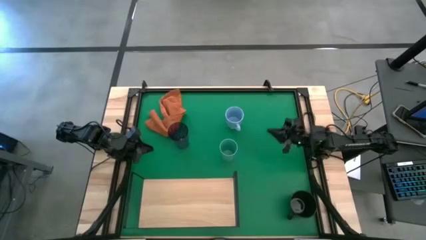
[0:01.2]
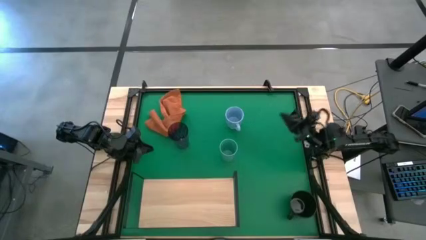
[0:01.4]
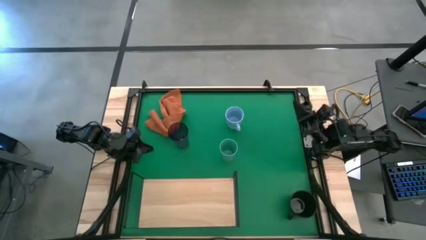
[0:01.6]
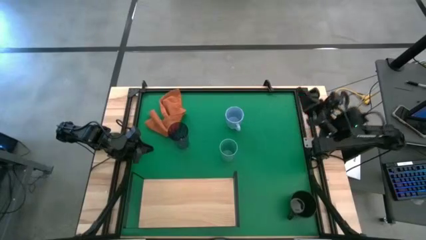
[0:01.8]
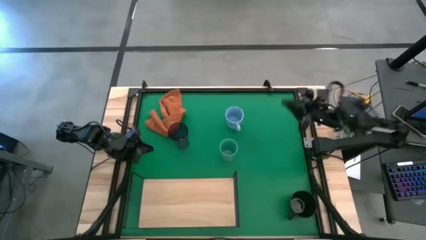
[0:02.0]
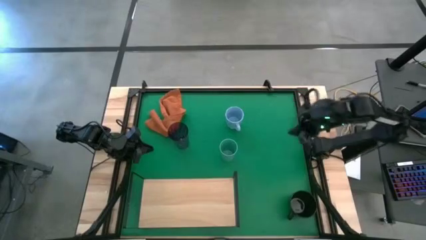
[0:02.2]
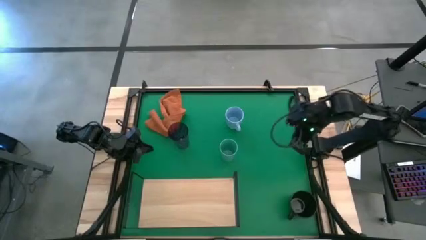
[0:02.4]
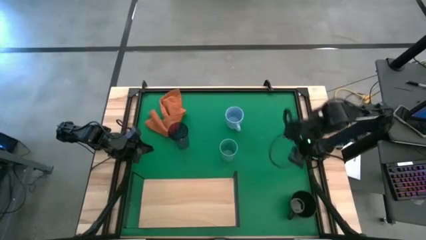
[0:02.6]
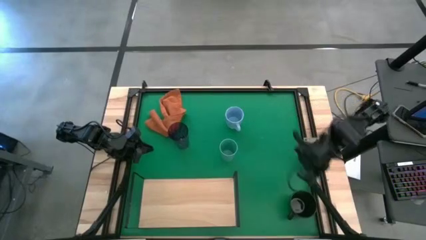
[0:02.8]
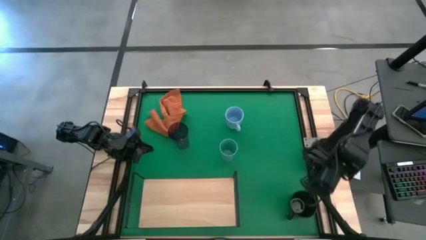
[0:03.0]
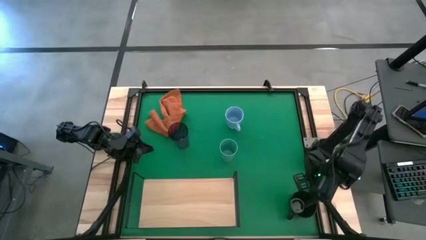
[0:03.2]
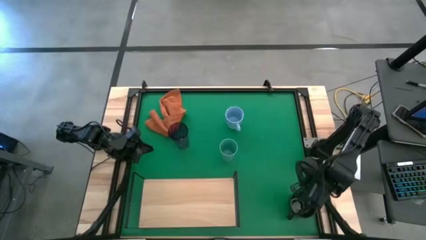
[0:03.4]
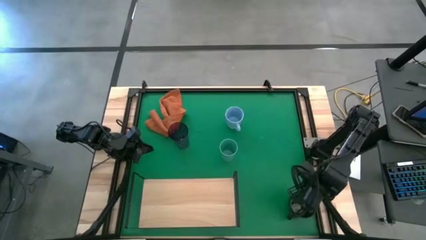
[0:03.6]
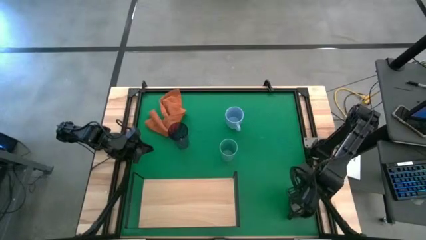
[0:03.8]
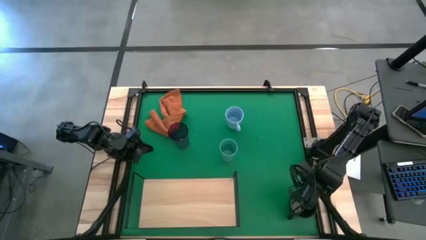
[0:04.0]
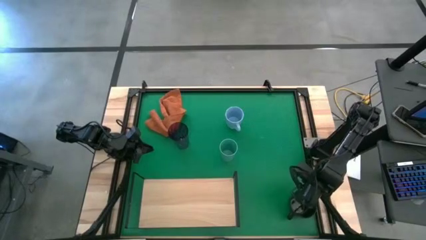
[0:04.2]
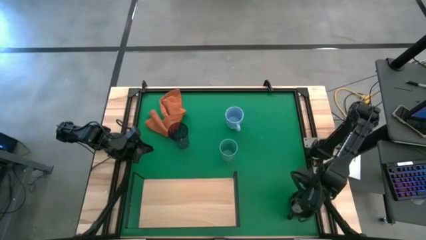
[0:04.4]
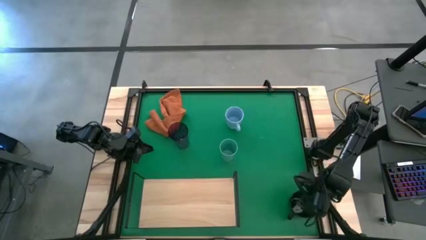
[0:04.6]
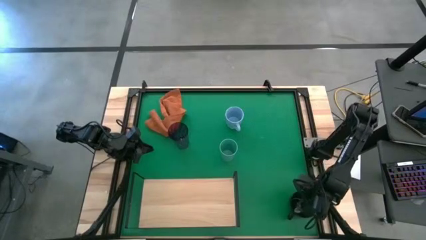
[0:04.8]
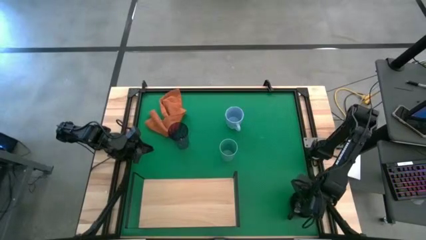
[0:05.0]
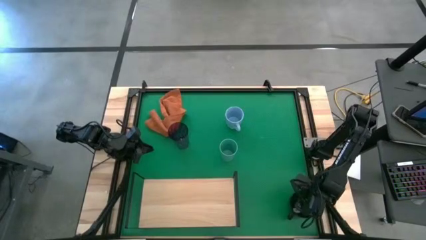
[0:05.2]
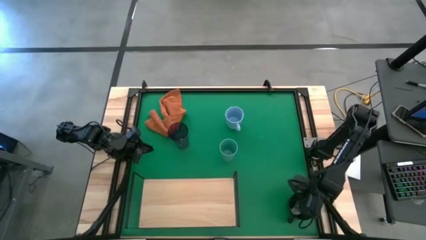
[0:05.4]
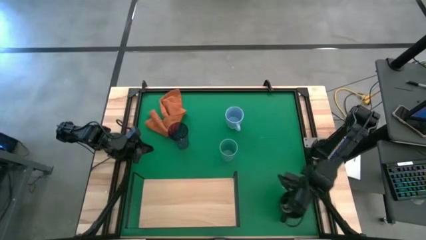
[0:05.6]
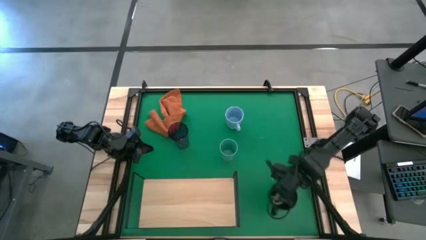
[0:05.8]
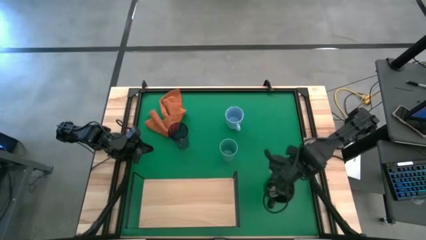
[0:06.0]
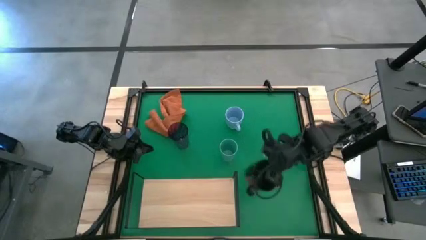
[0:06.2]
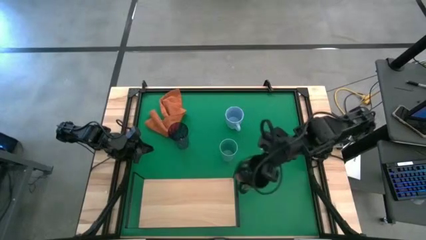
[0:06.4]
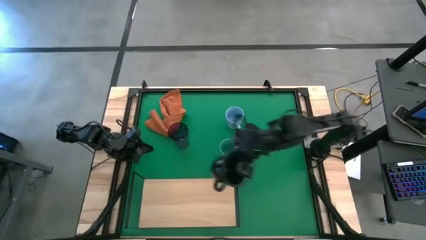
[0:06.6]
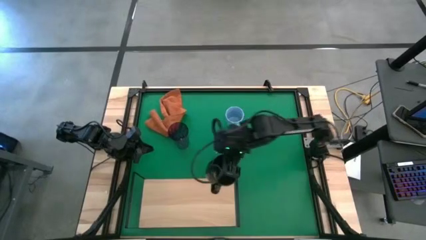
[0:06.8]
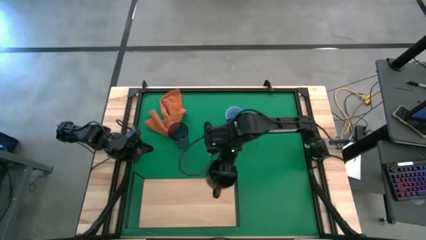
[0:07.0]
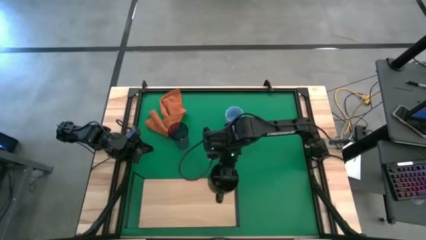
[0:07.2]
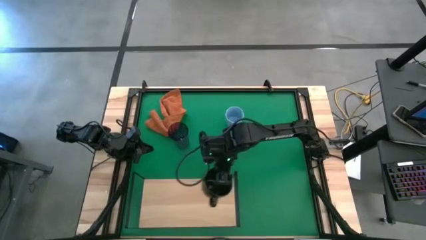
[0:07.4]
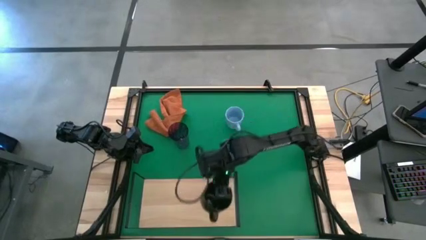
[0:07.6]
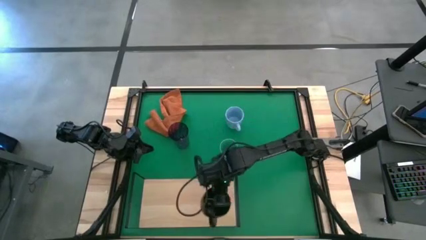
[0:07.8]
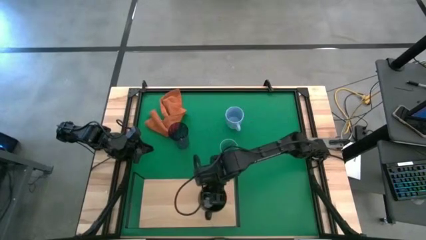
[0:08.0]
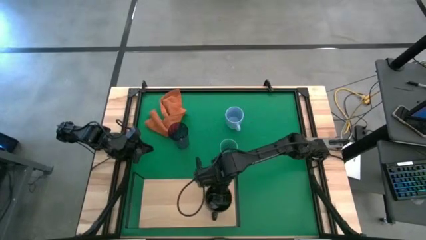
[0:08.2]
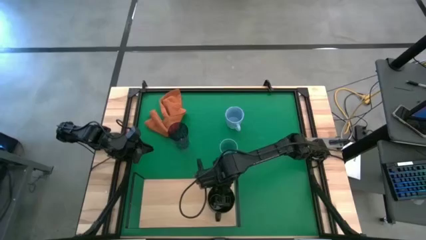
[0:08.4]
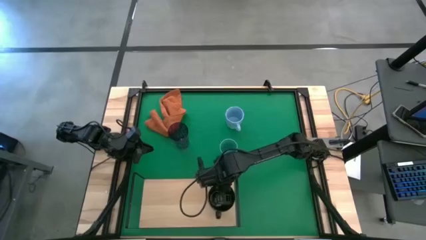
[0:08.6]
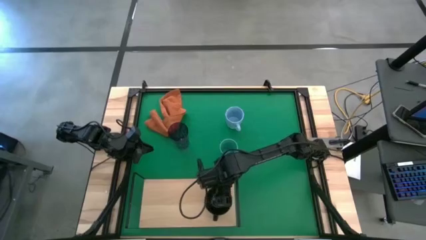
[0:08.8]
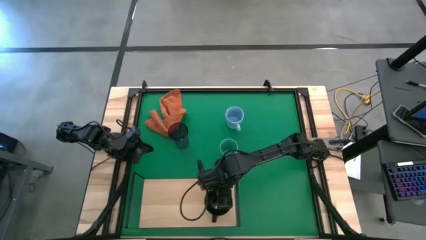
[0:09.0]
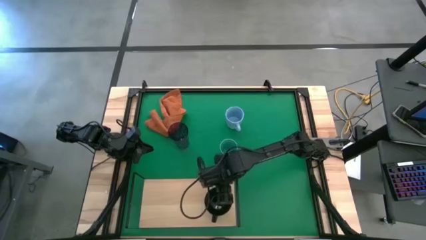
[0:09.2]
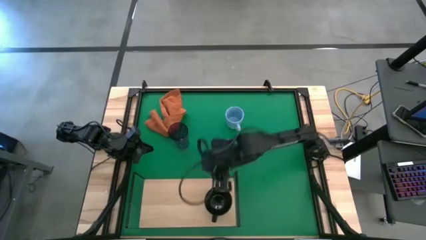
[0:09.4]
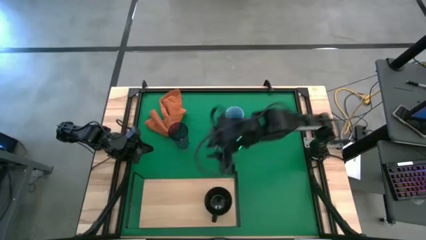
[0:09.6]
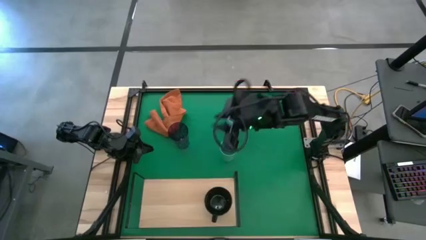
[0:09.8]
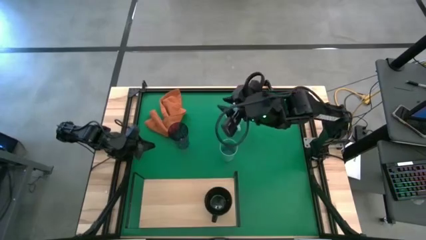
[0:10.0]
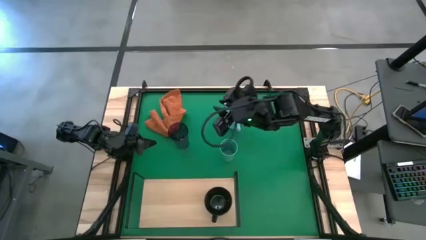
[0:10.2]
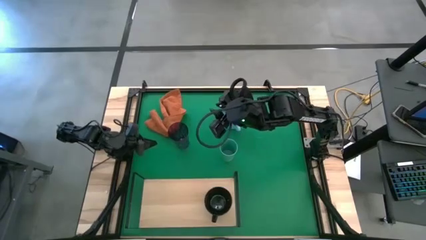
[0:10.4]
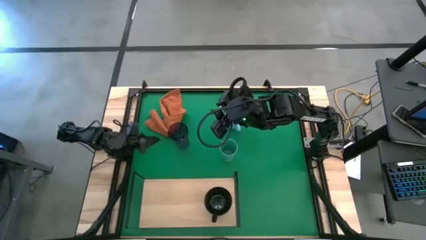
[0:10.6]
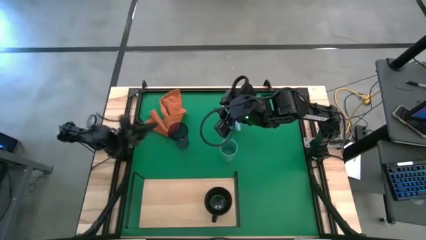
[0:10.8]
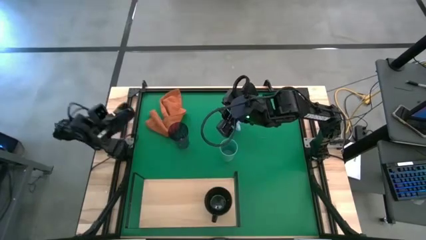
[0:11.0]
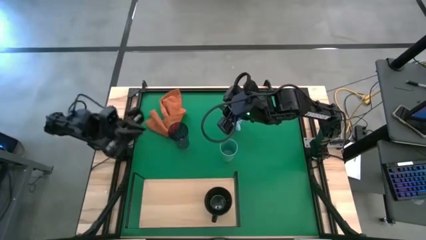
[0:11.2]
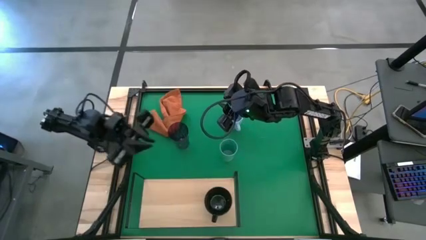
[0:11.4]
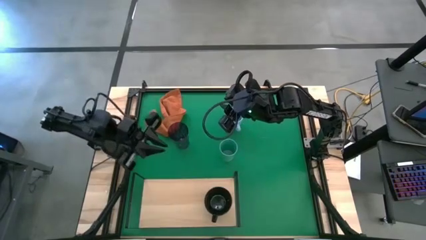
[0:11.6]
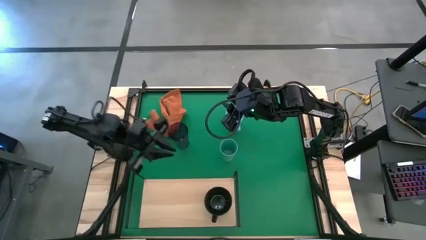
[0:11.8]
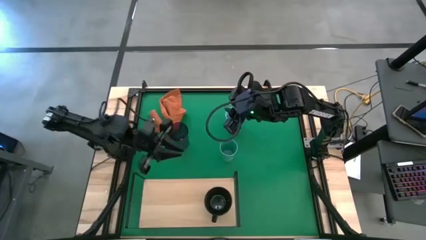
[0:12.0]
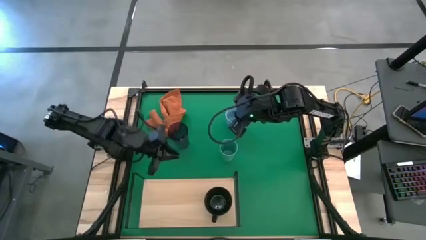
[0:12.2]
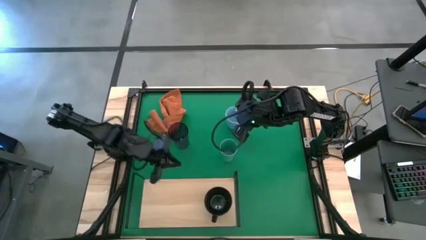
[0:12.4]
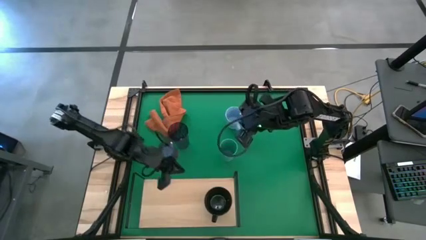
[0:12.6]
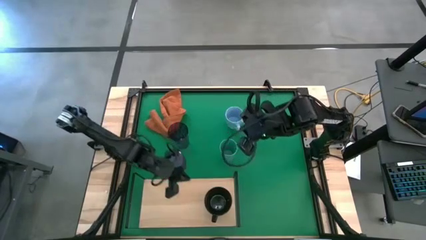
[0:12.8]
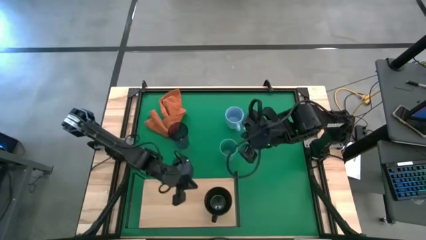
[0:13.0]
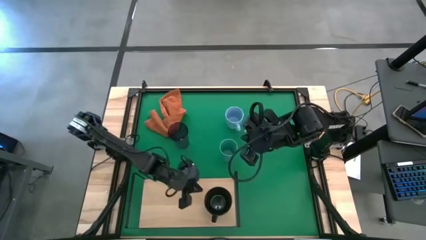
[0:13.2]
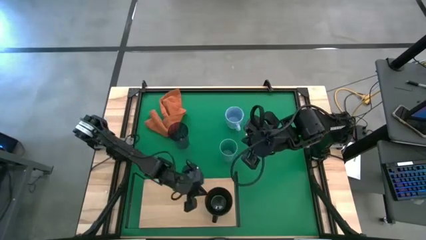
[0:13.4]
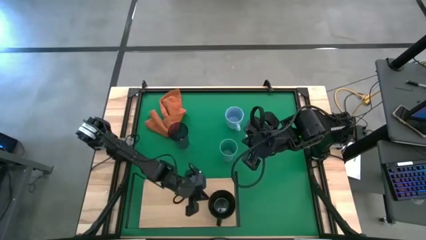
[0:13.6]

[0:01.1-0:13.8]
Task: Stack small to large cups/mugs on shelf
Put the black mug on the shelf
